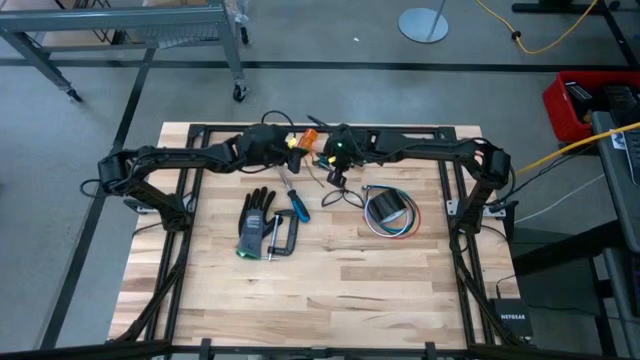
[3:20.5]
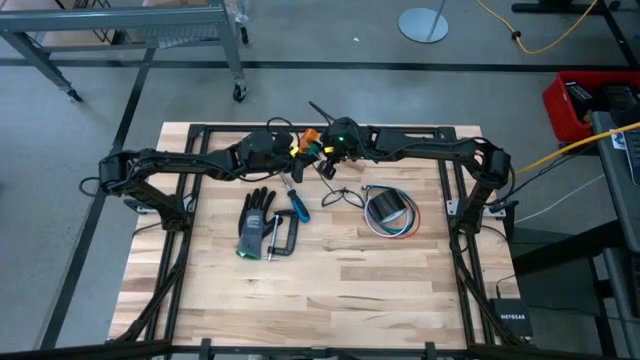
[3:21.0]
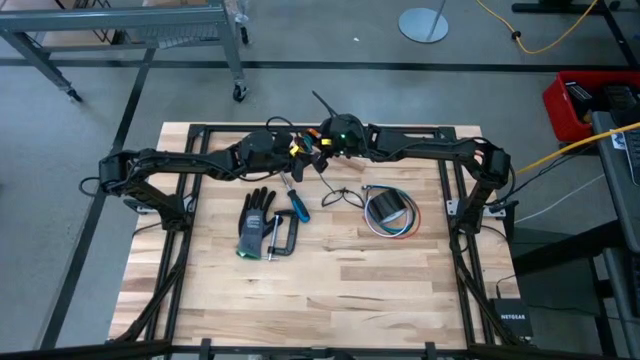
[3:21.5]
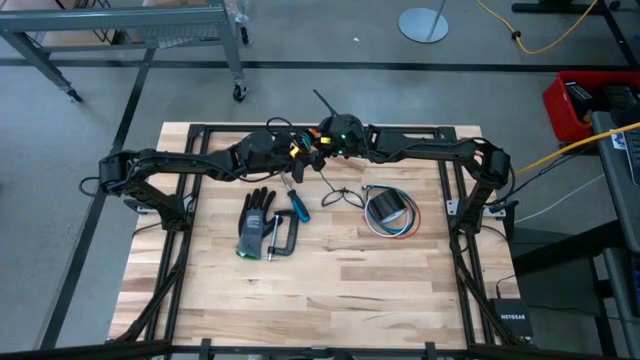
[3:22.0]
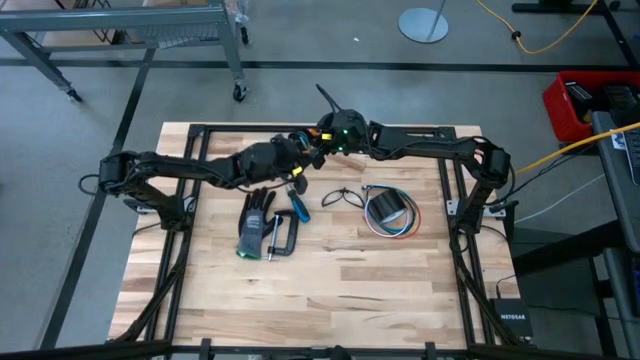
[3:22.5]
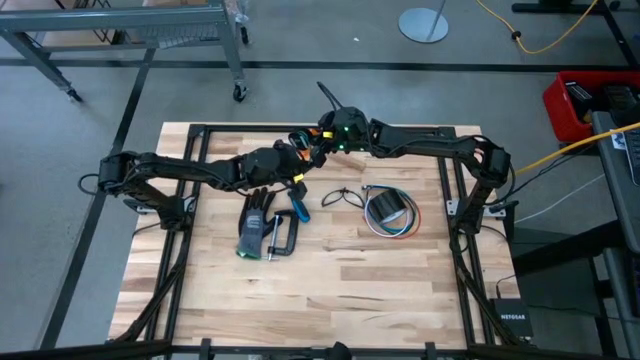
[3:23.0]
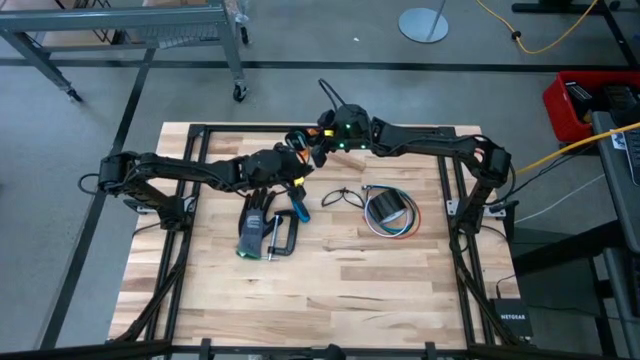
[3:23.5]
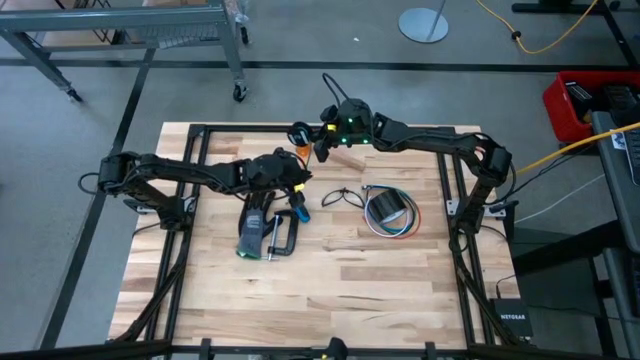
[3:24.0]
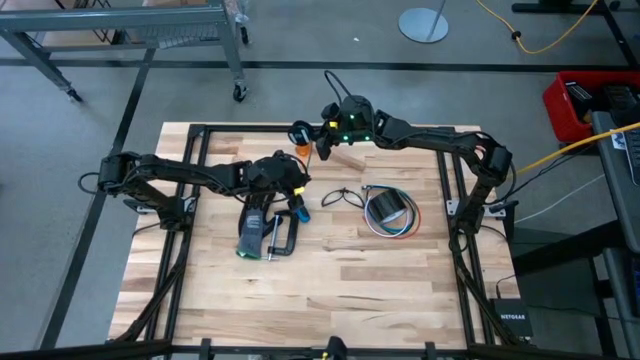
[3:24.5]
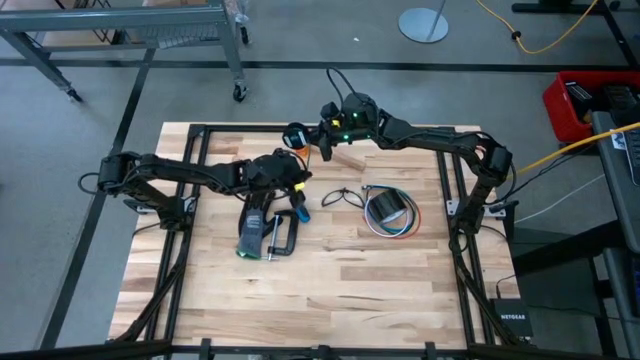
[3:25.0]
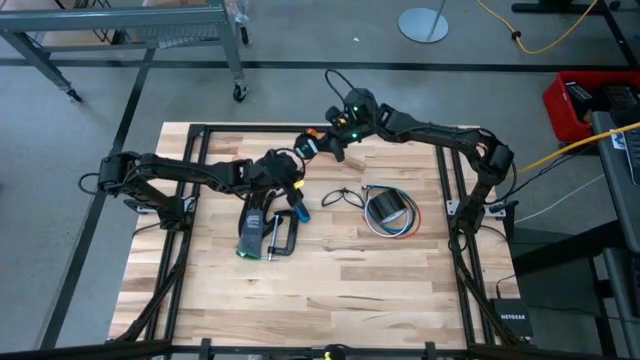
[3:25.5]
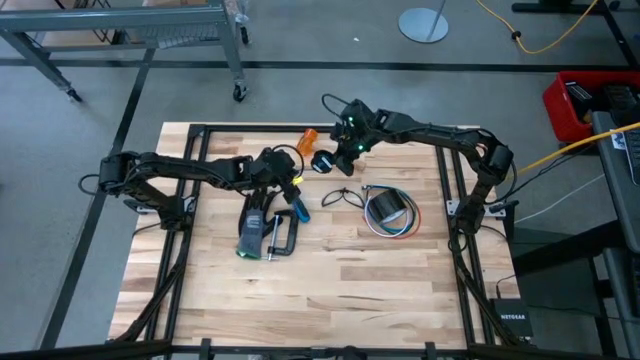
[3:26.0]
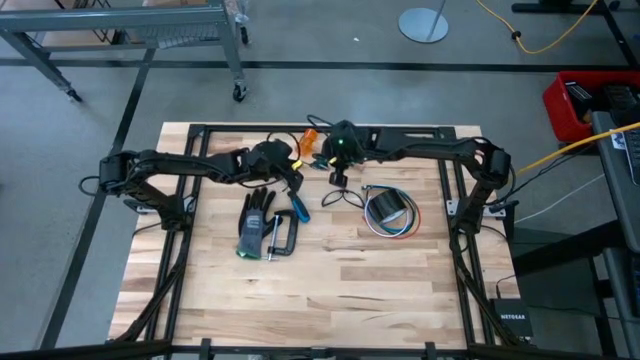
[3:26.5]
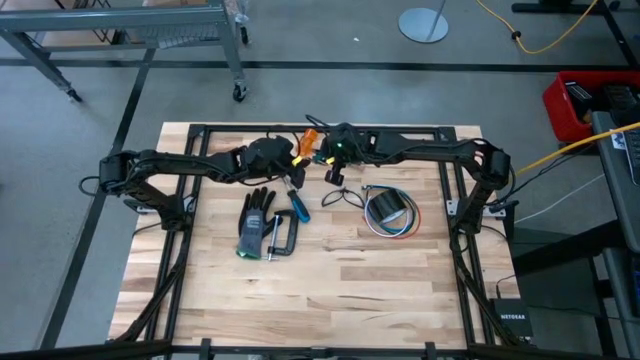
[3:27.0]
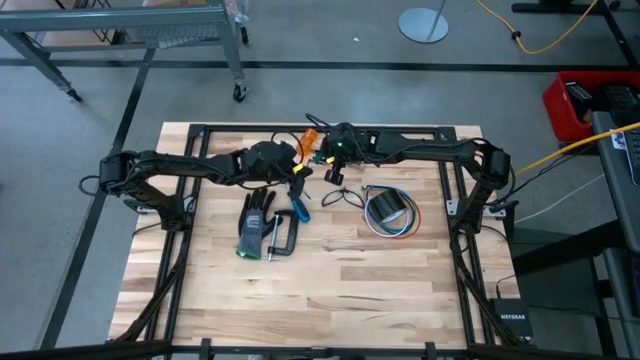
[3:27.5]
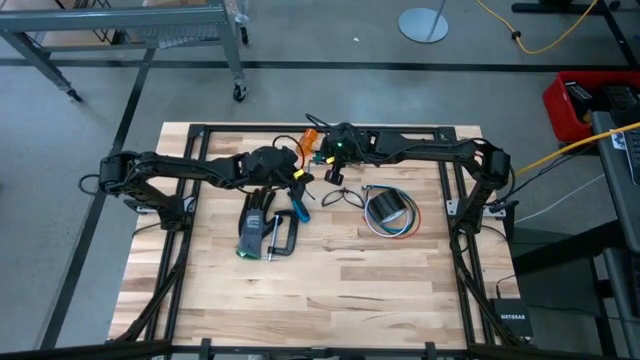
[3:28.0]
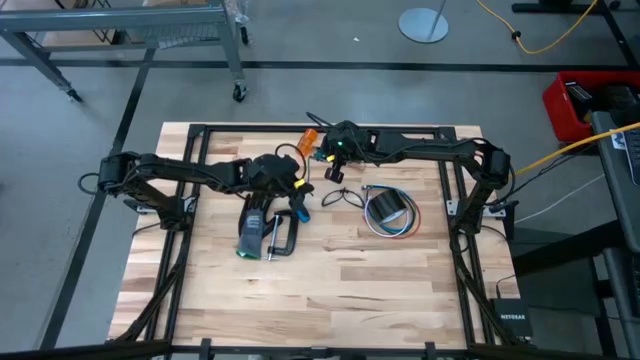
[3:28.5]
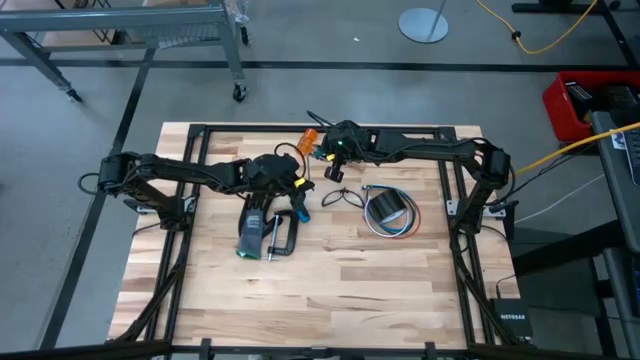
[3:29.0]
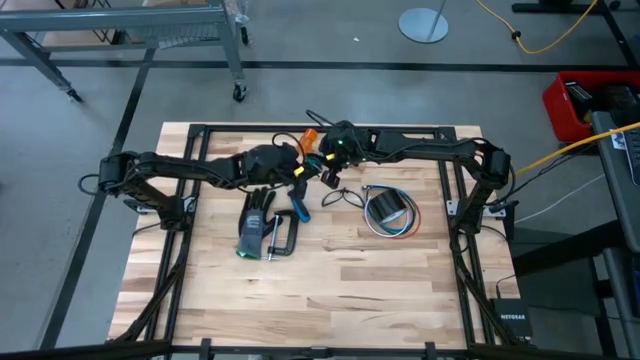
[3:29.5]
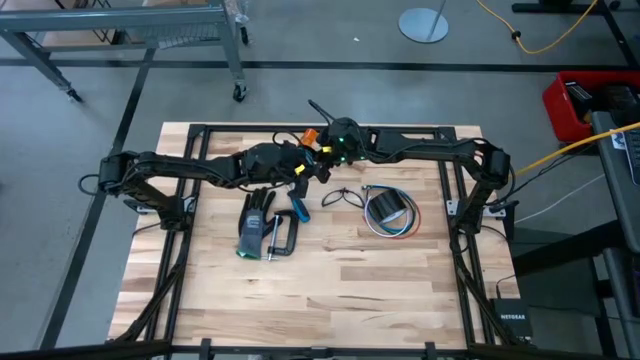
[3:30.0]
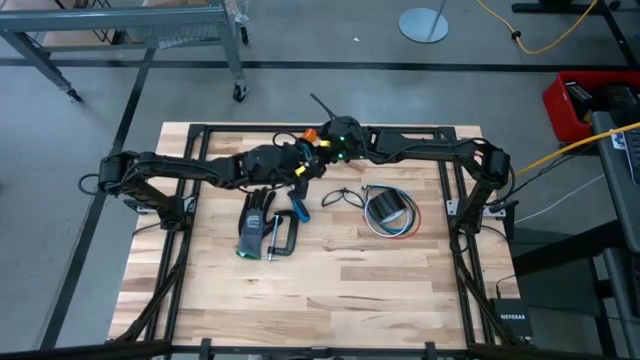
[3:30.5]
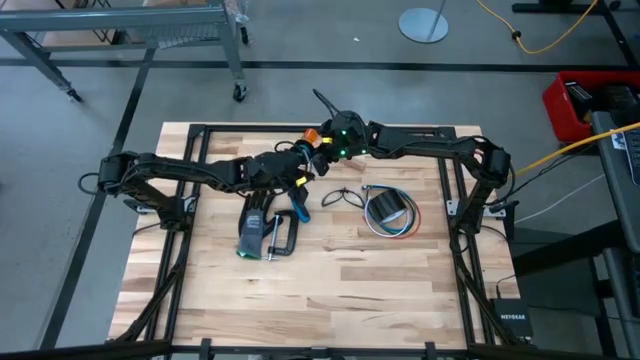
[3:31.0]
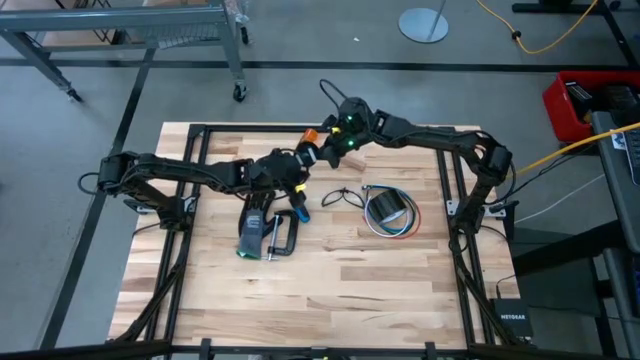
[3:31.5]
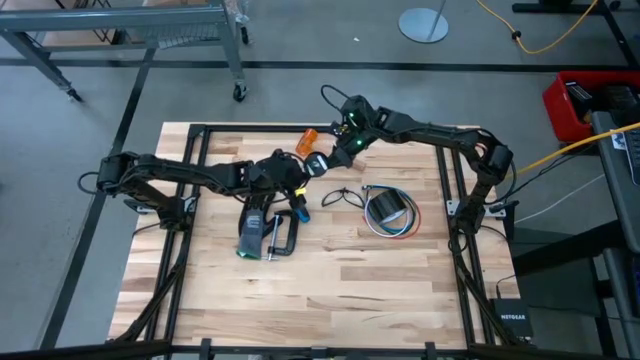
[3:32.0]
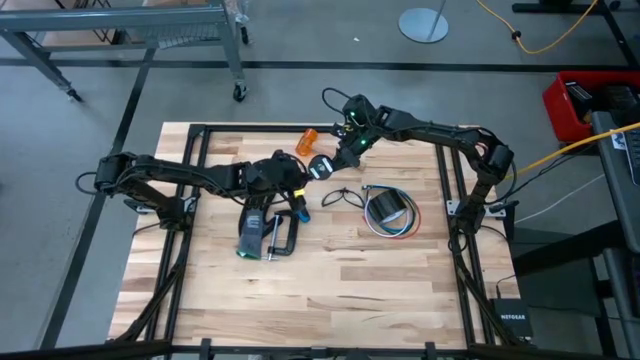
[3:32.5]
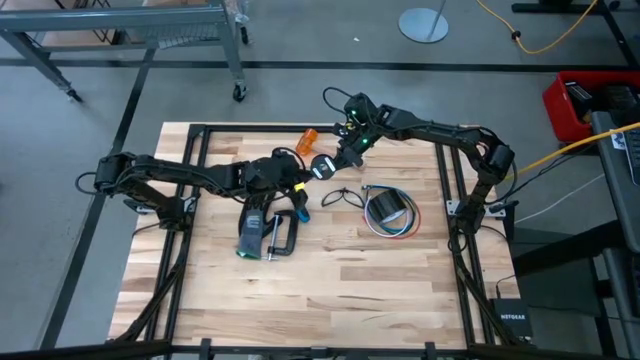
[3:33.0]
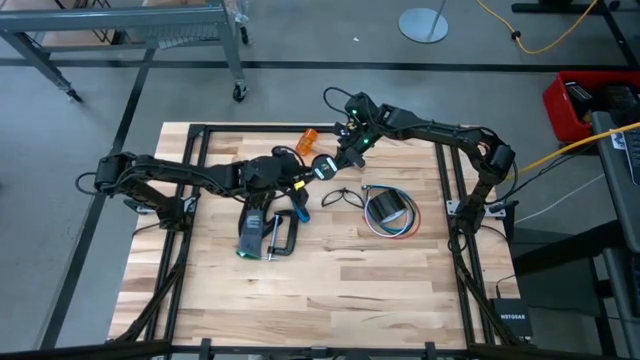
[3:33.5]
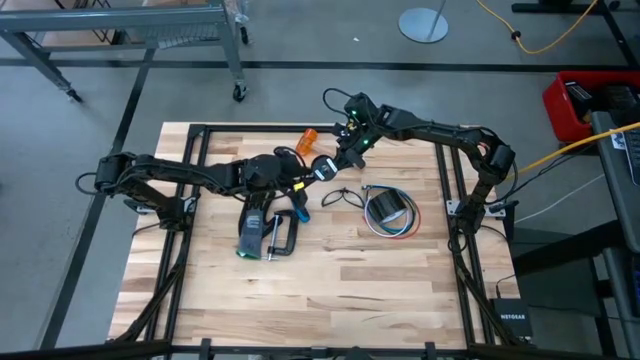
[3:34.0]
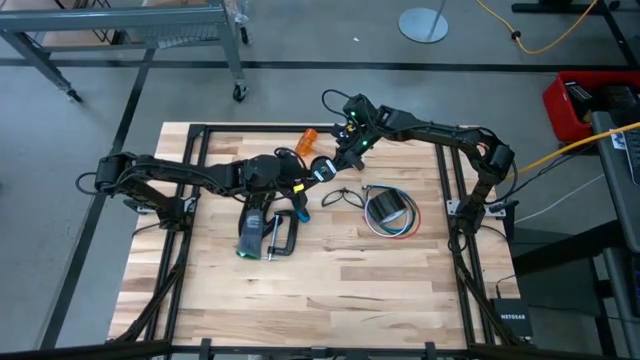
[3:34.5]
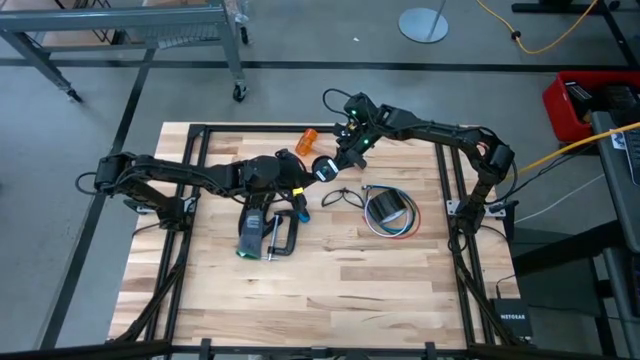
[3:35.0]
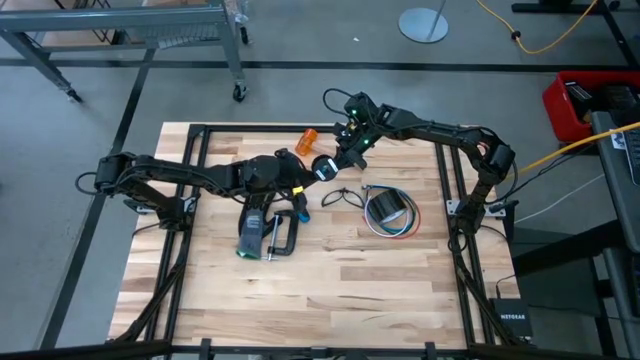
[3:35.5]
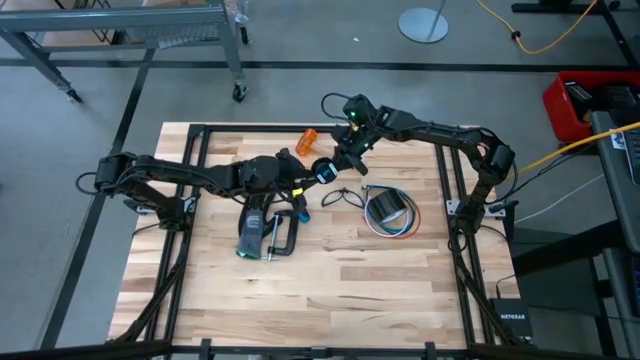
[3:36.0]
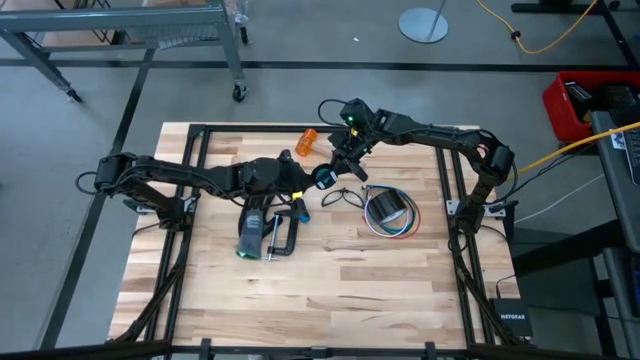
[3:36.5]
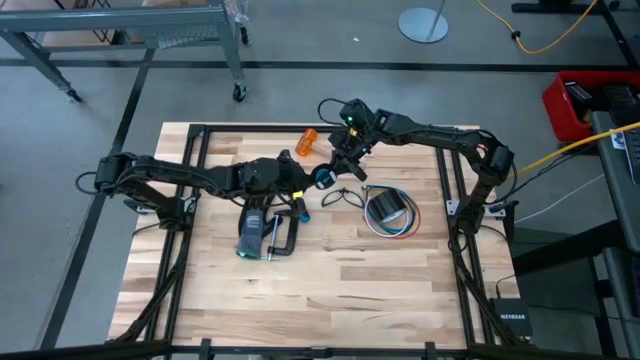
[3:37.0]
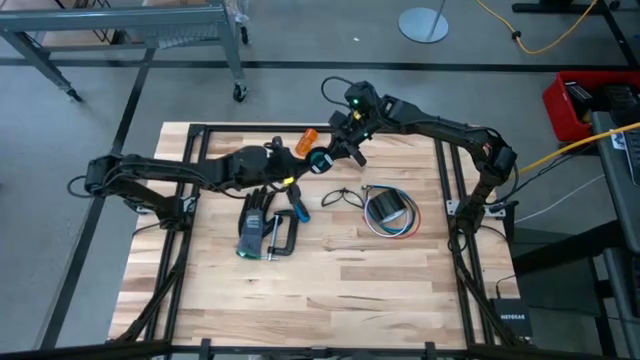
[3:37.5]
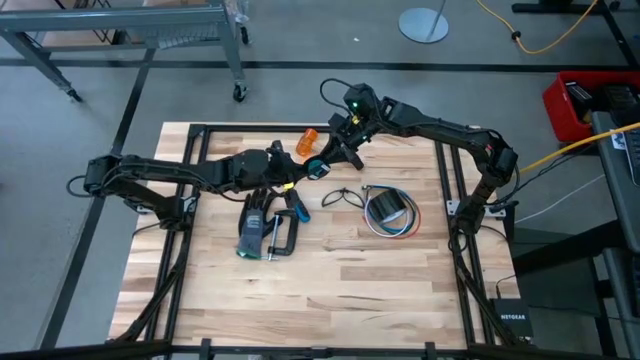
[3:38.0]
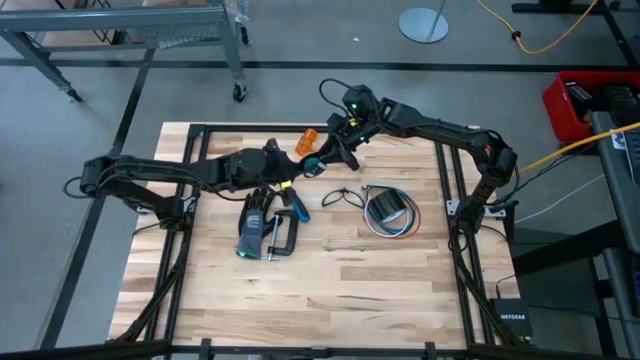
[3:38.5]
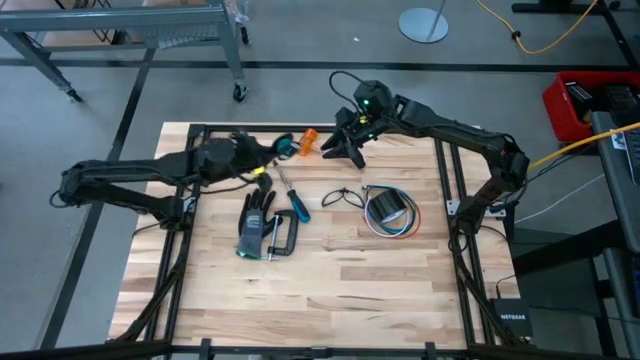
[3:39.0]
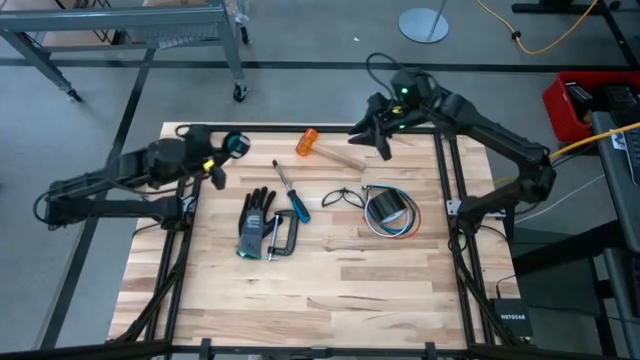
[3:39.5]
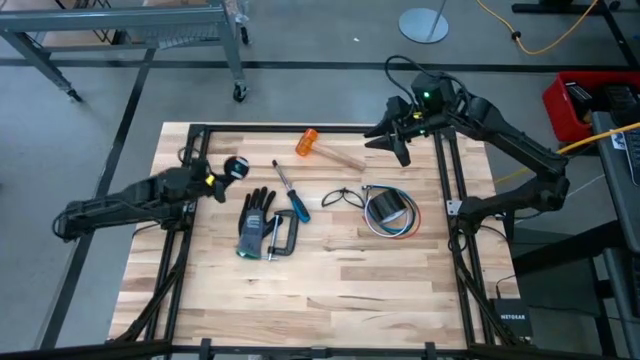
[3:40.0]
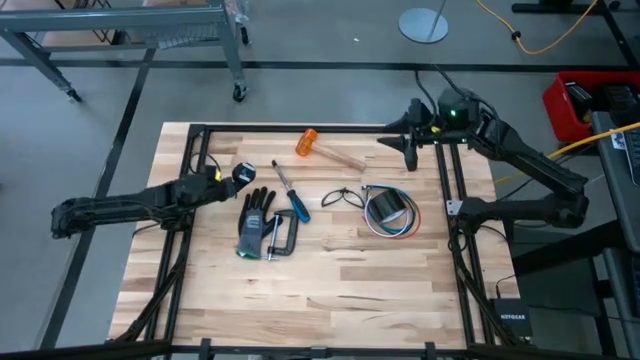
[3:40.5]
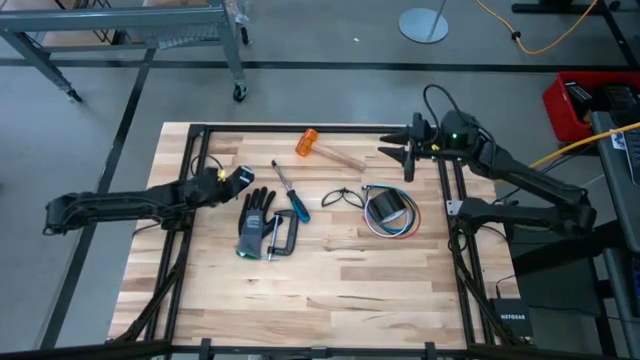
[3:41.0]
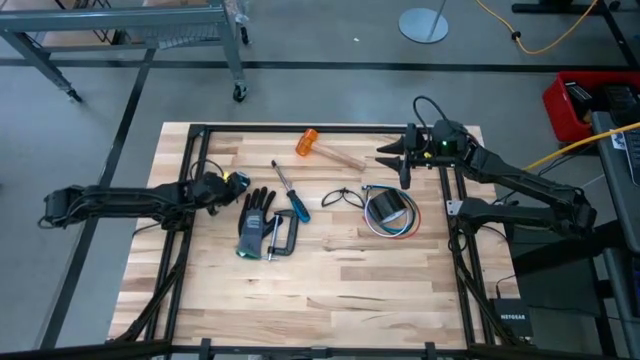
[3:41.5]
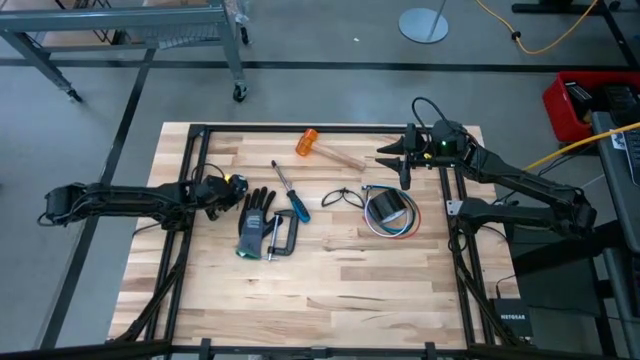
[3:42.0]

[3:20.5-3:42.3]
Task: Coil cords
Coil the green wire onto the spool
